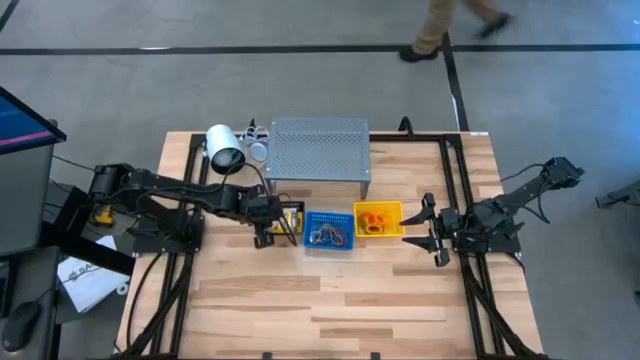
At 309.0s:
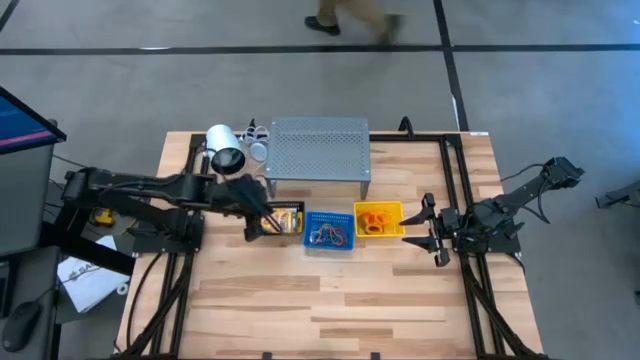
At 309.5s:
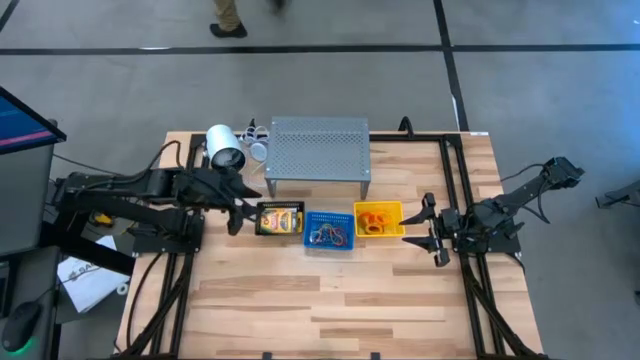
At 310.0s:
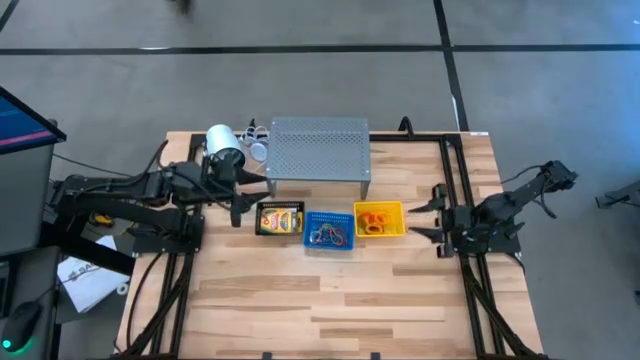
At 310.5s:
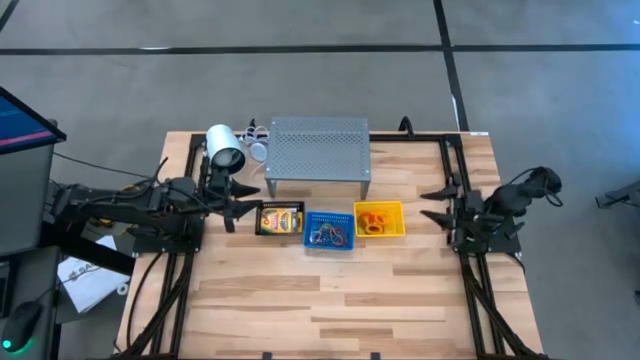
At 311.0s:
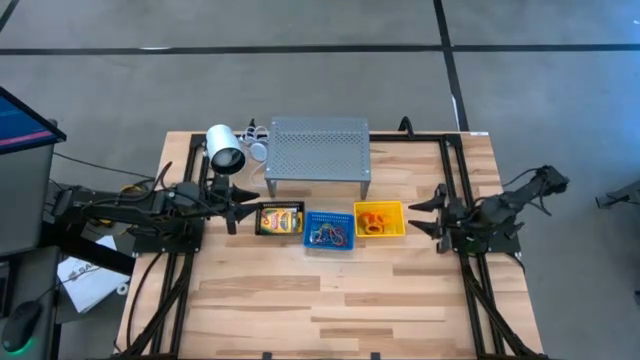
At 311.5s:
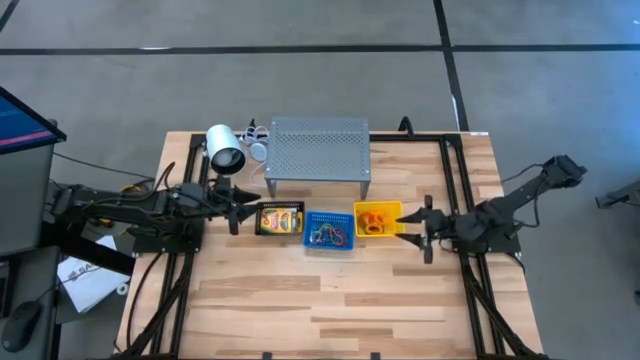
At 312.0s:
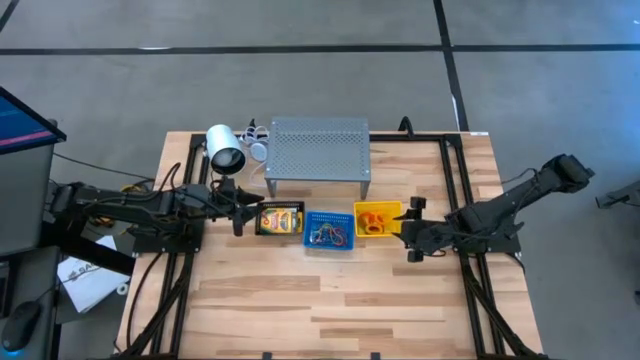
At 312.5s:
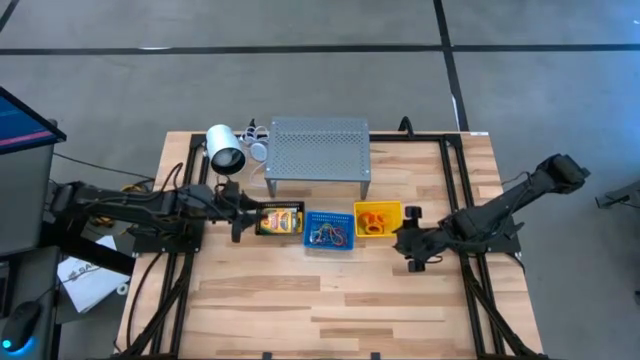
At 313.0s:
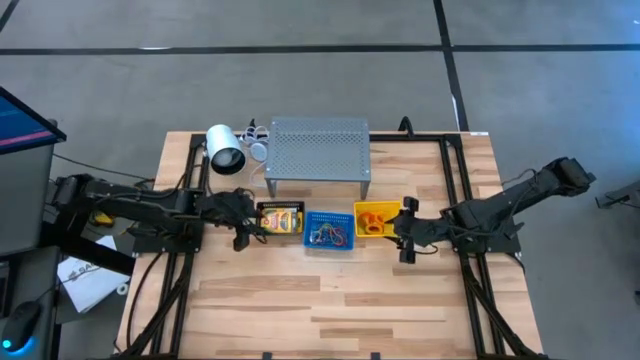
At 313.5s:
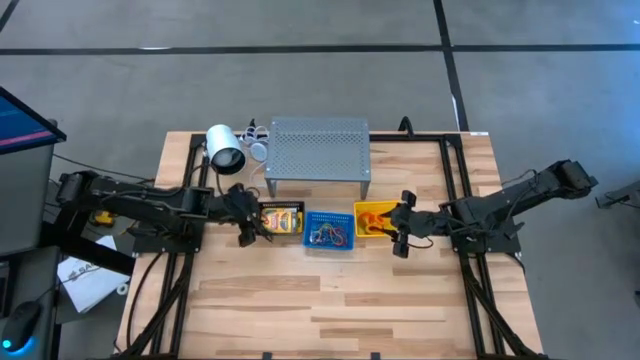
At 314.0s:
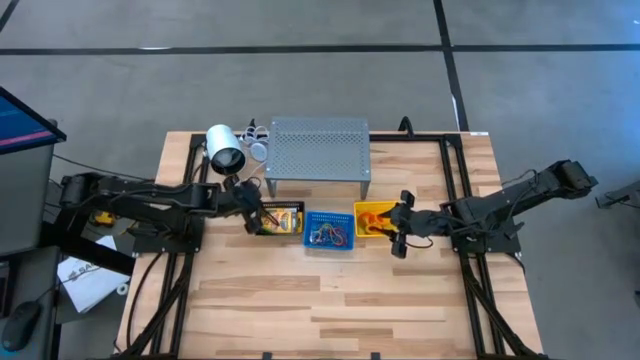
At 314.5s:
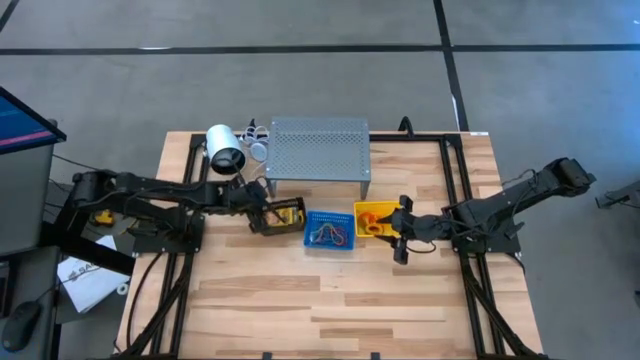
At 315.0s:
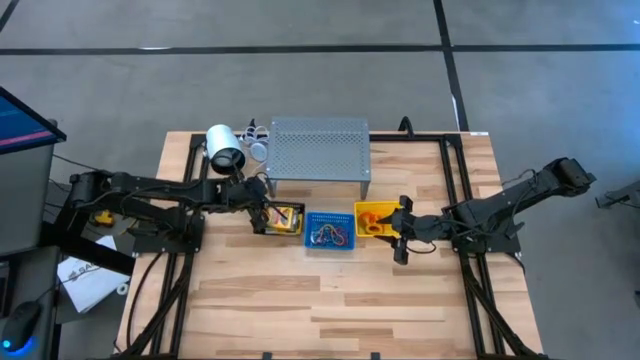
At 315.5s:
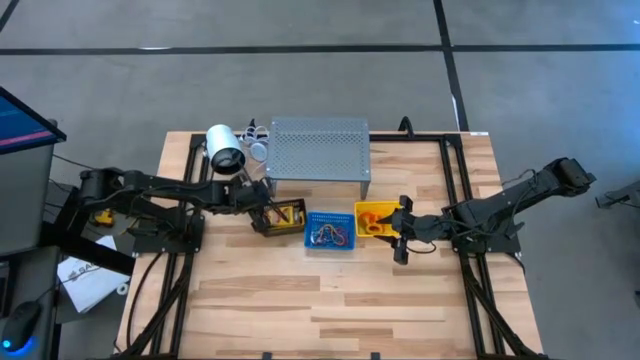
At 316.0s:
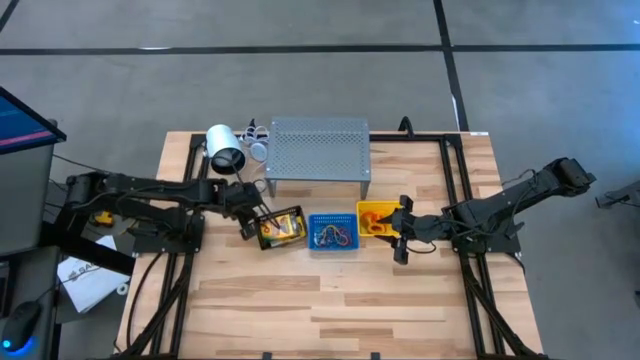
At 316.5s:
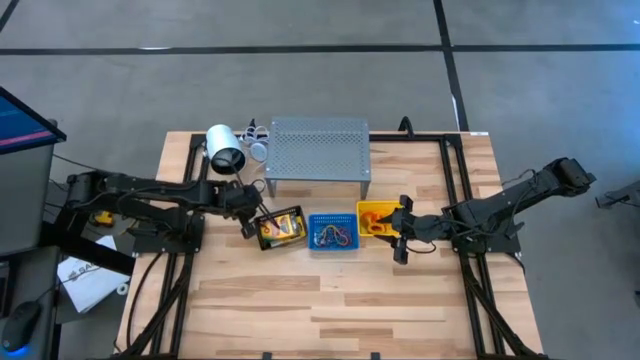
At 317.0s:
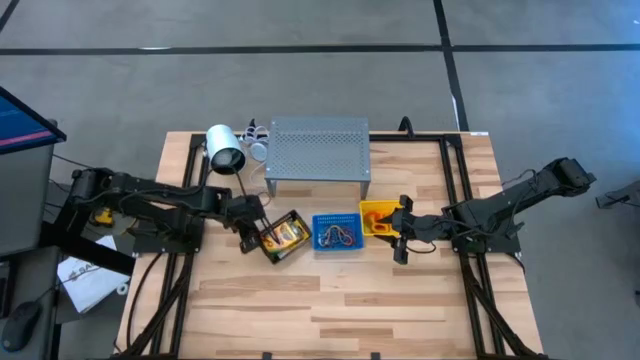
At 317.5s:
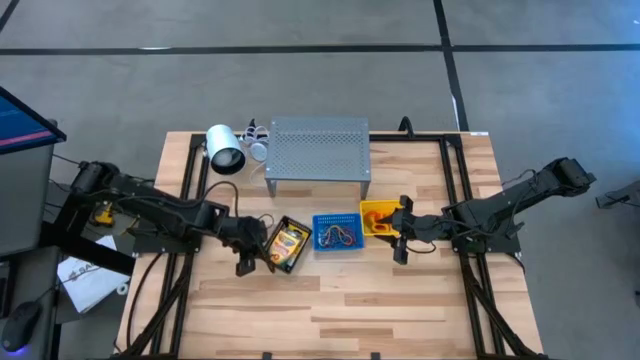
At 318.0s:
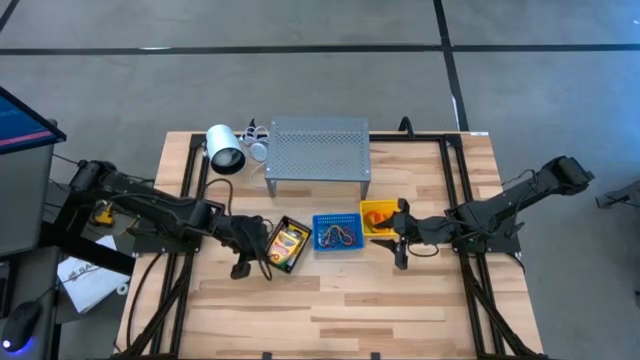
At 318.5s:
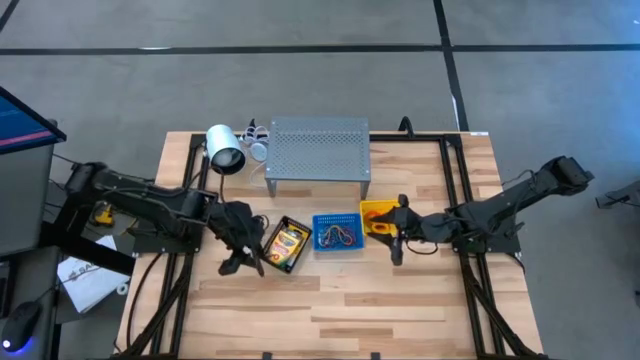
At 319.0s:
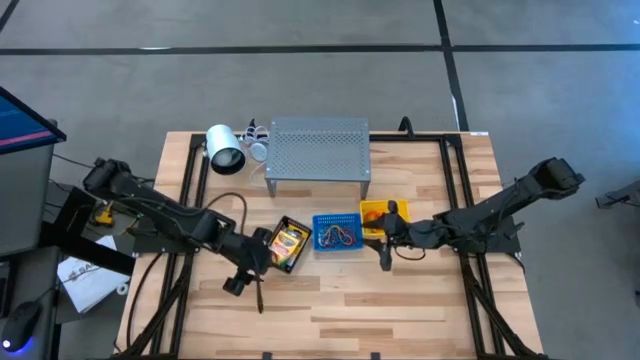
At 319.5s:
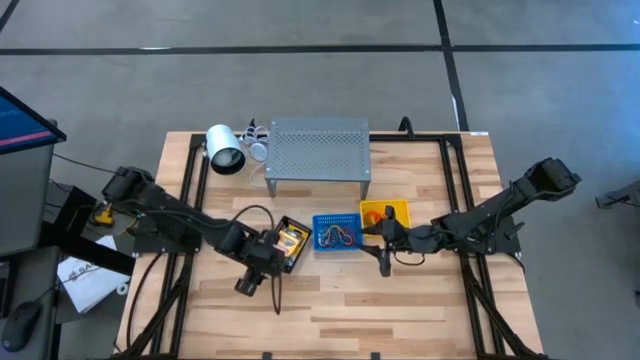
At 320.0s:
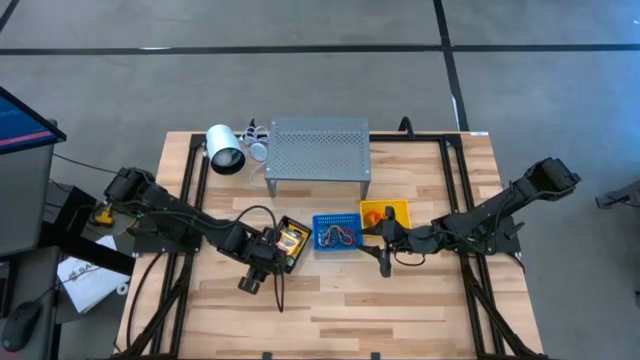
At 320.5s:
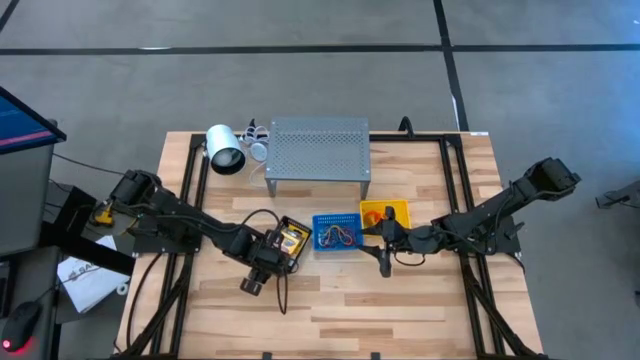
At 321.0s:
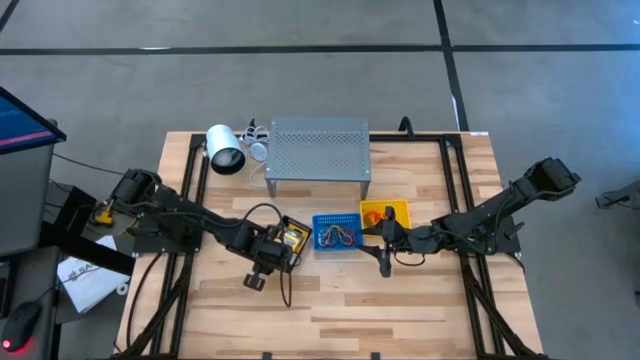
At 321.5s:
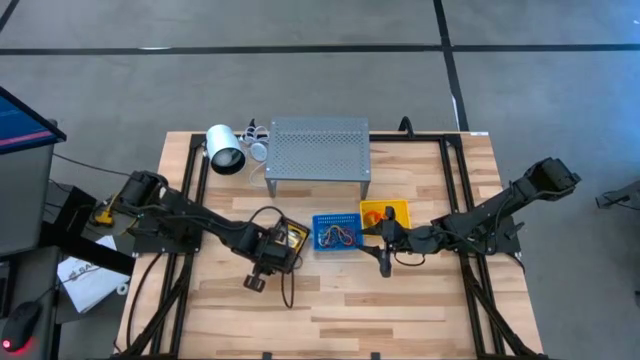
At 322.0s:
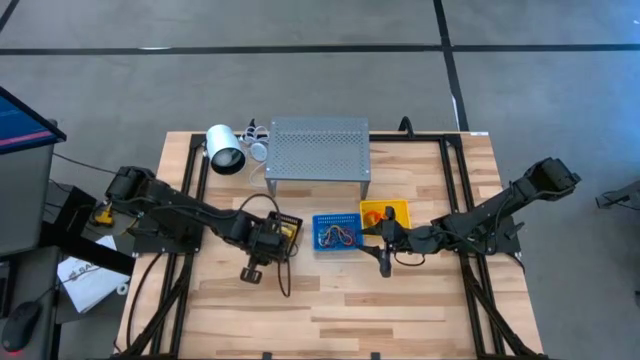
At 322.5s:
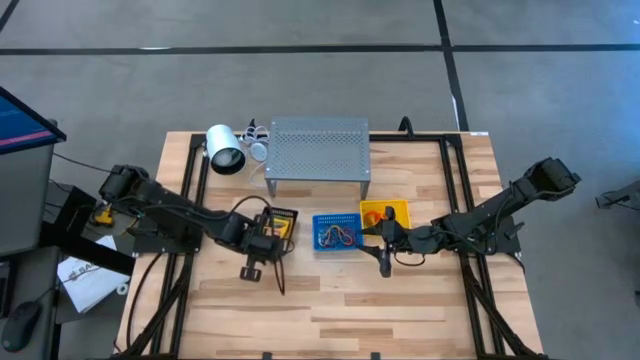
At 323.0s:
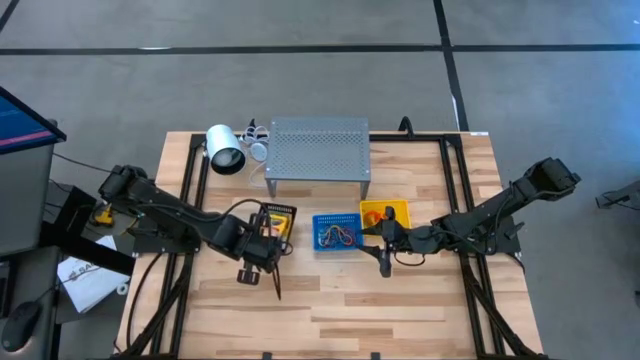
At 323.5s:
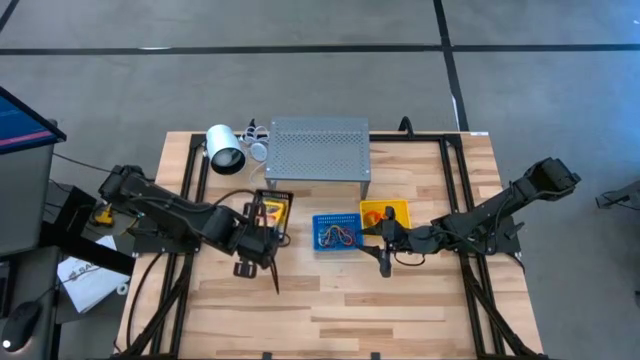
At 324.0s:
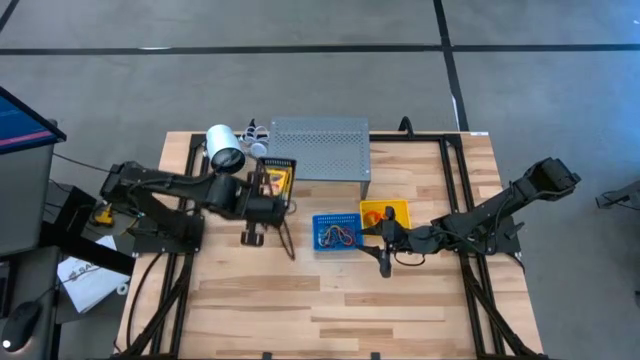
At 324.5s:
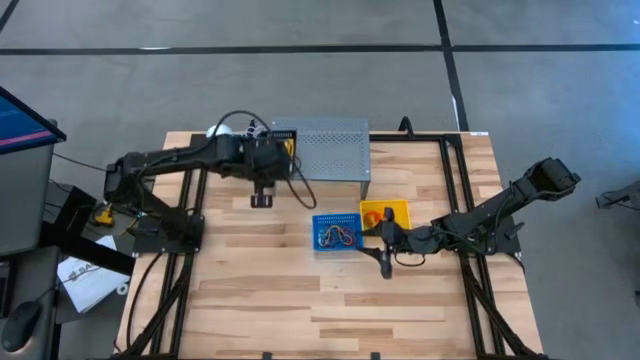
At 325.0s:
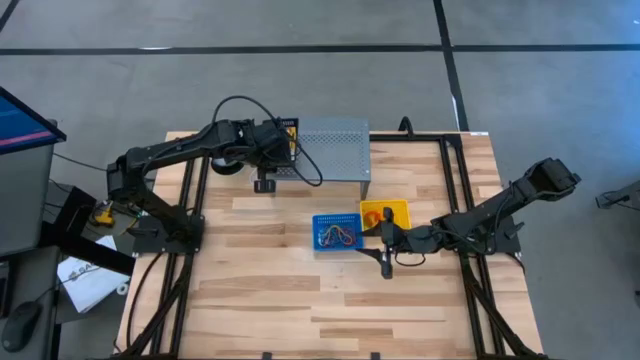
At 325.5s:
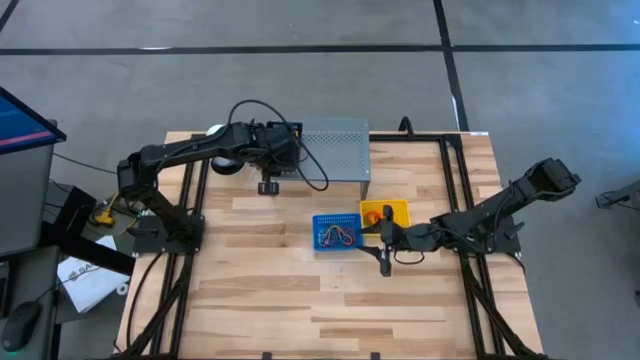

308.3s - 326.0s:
Task: Pick & Place Office Desk Supplies
Put the black bin on the shelf

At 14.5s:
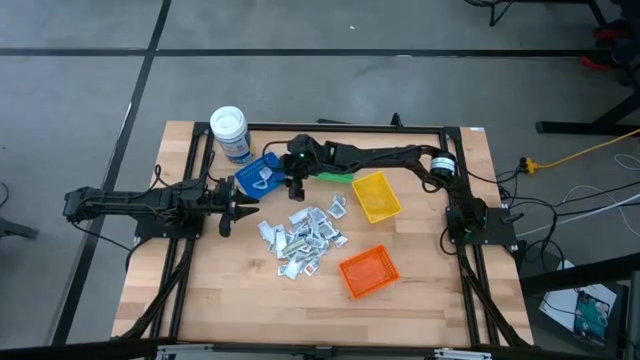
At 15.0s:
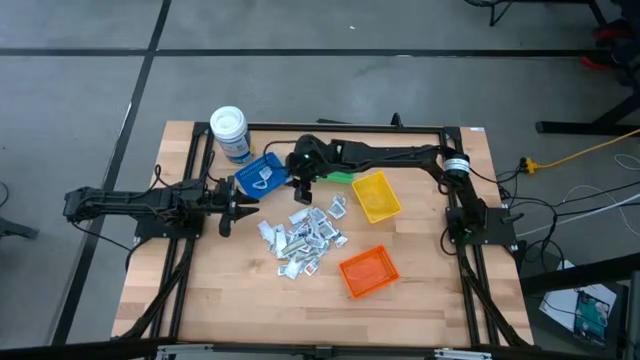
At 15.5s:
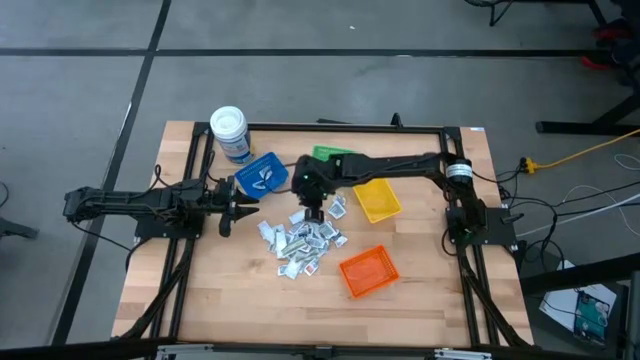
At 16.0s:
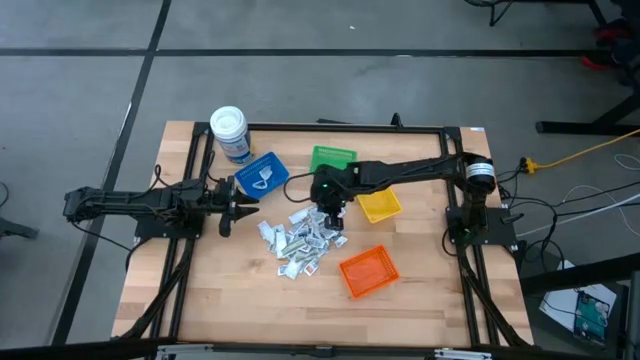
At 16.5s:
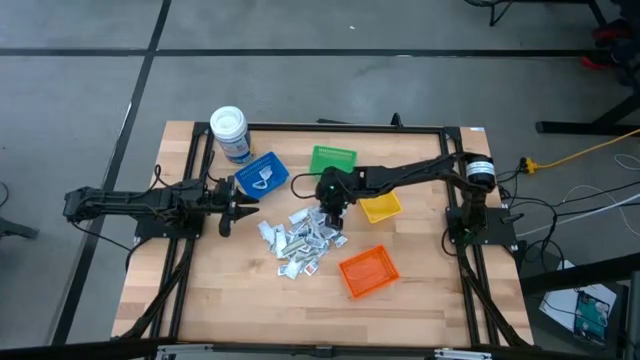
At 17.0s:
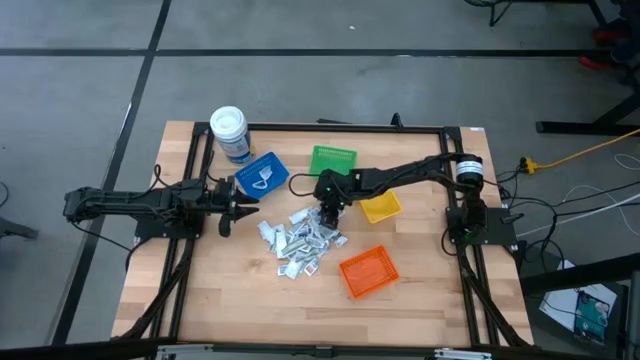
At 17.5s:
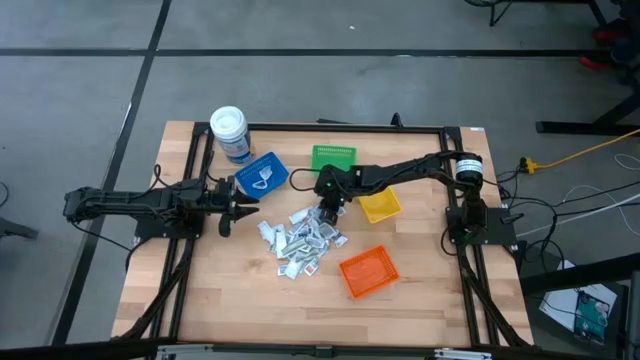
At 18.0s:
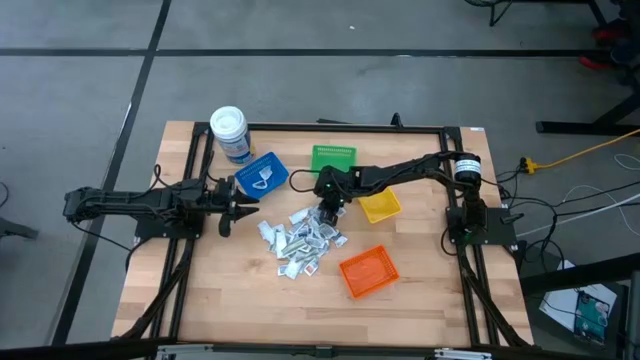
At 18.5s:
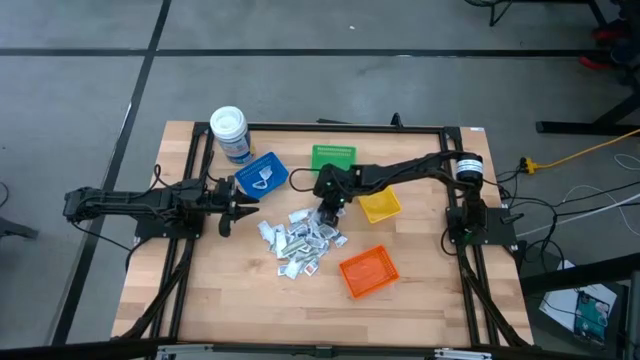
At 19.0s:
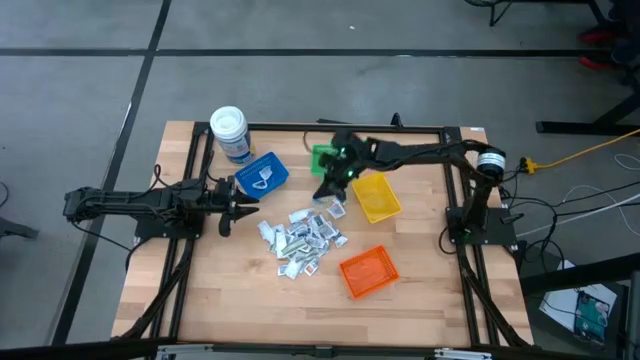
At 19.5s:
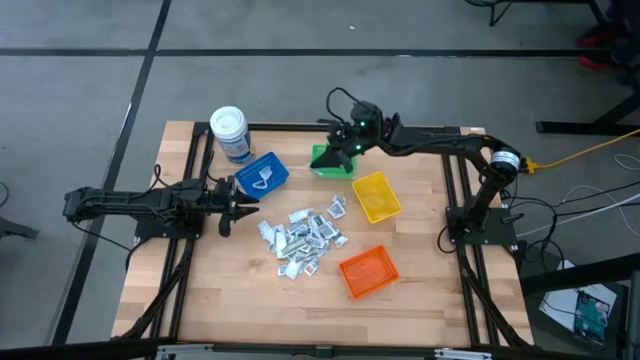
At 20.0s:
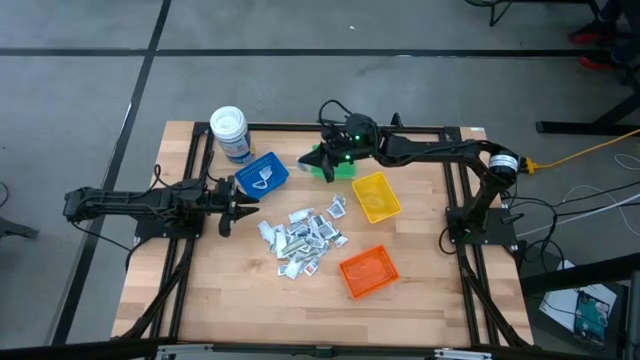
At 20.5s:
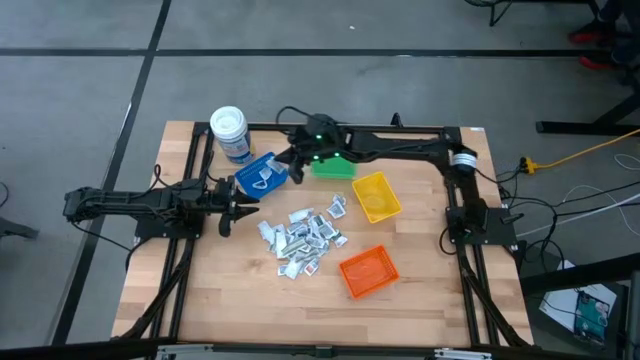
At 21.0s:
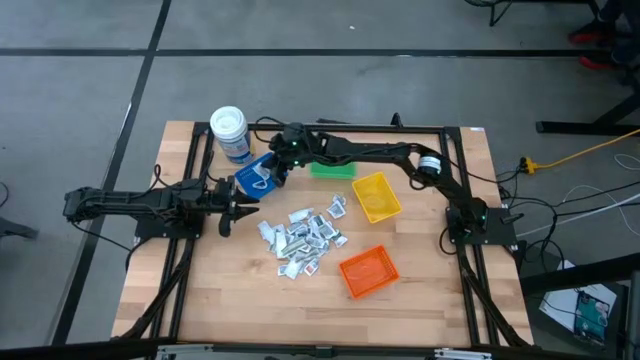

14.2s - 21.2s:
Task: Pick & Place First Aid Supplies
Put the white alcohol pad into the blue bin
